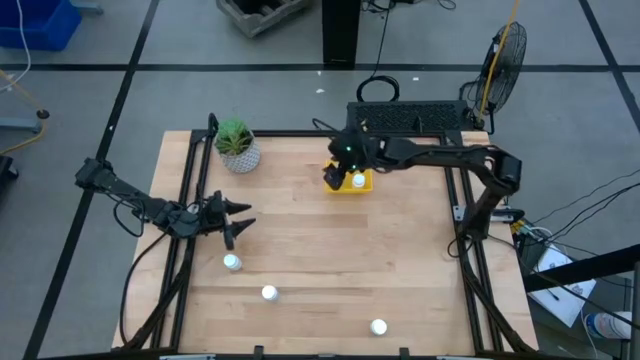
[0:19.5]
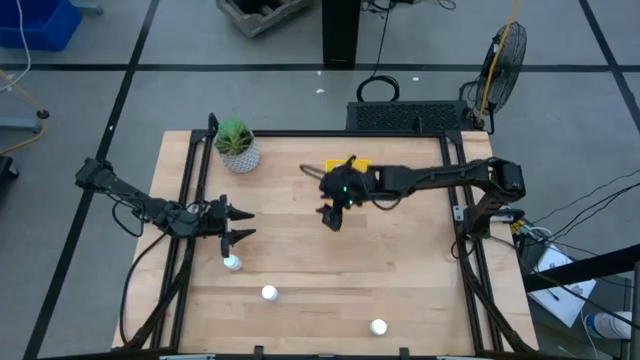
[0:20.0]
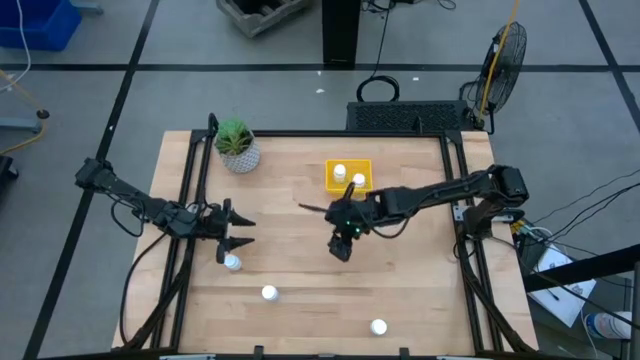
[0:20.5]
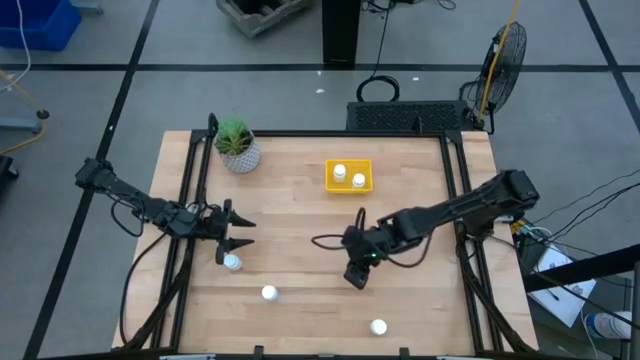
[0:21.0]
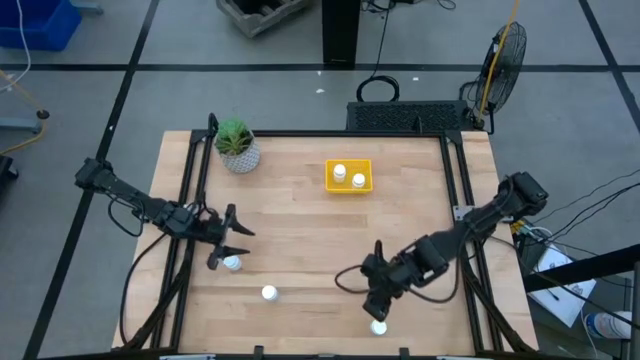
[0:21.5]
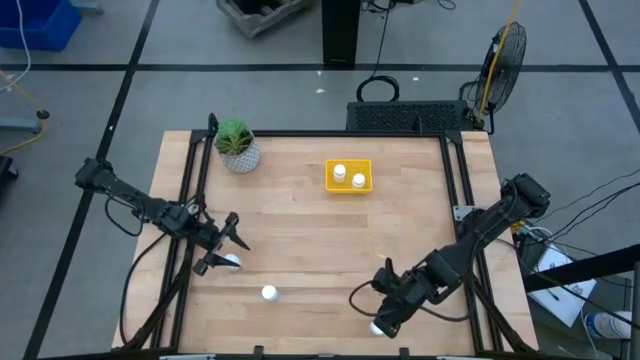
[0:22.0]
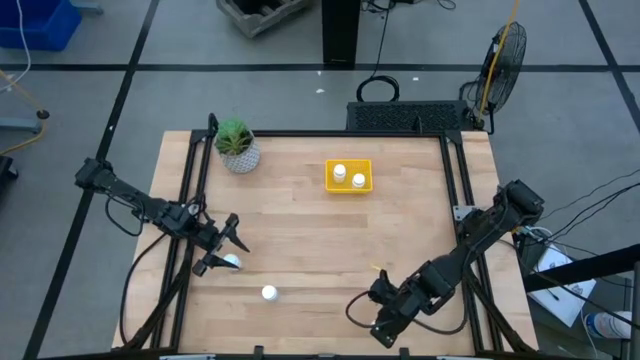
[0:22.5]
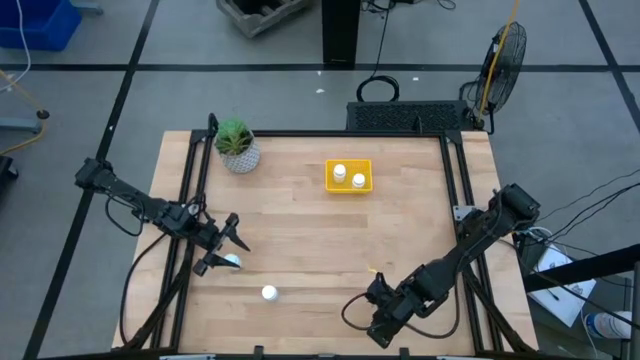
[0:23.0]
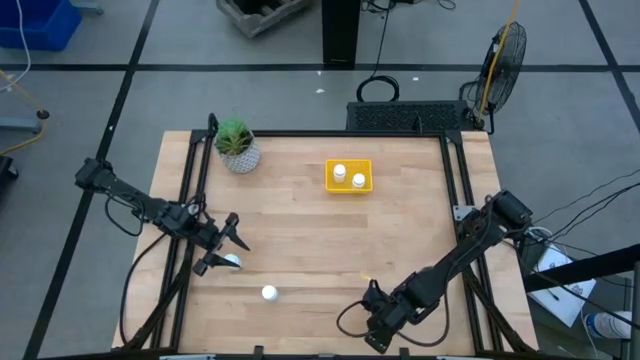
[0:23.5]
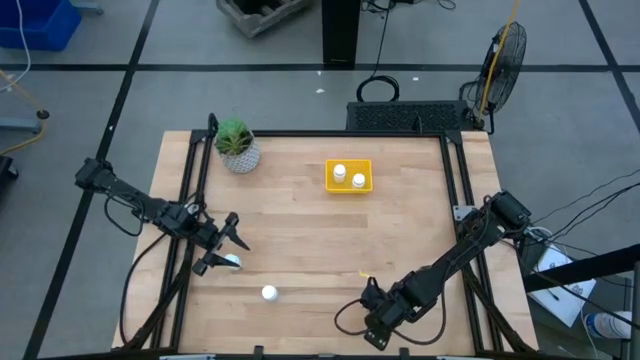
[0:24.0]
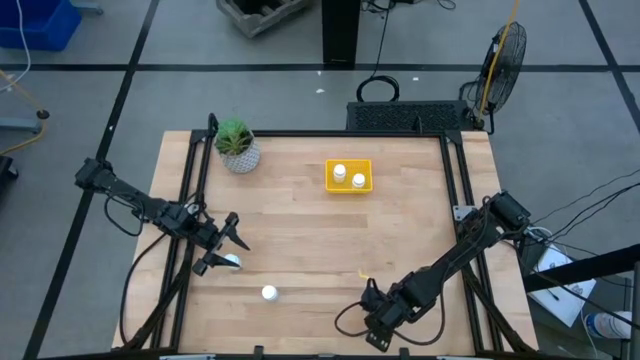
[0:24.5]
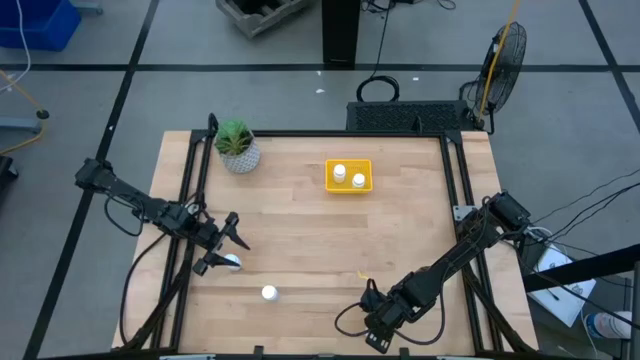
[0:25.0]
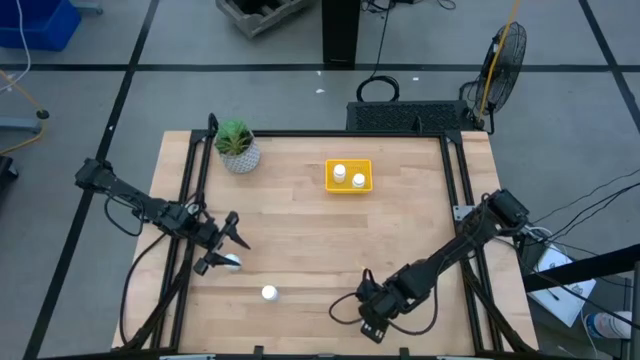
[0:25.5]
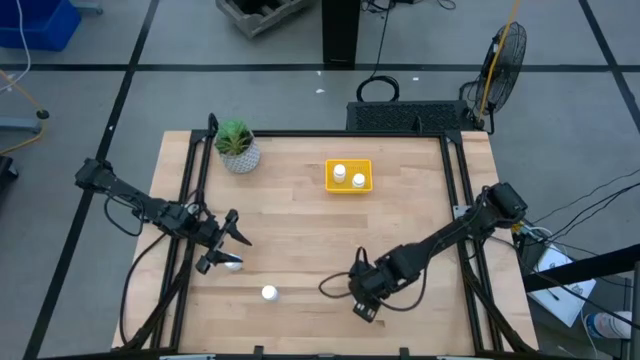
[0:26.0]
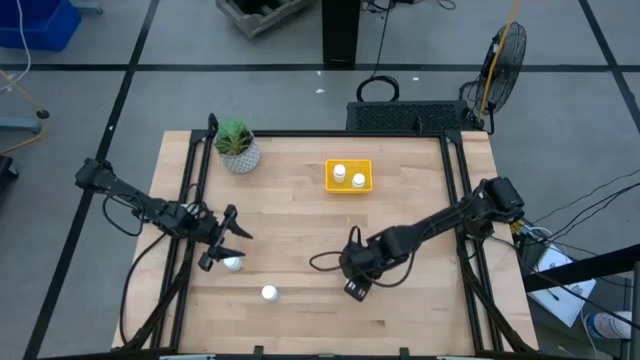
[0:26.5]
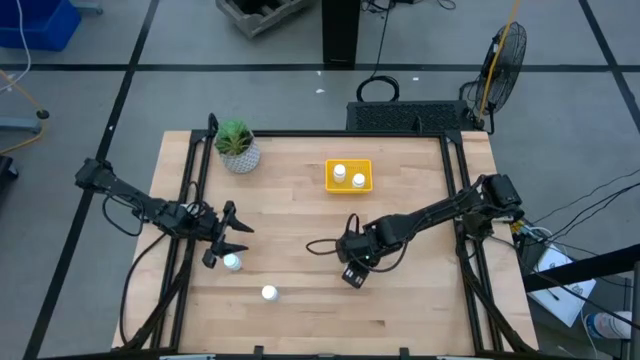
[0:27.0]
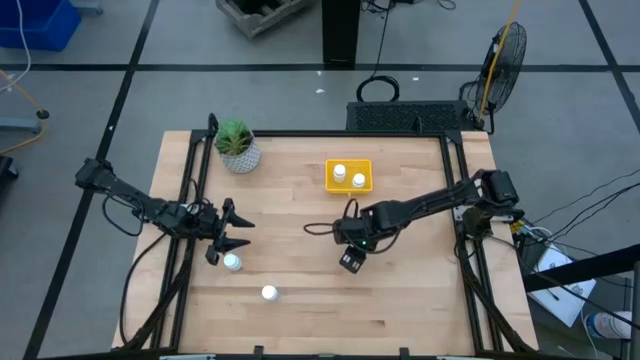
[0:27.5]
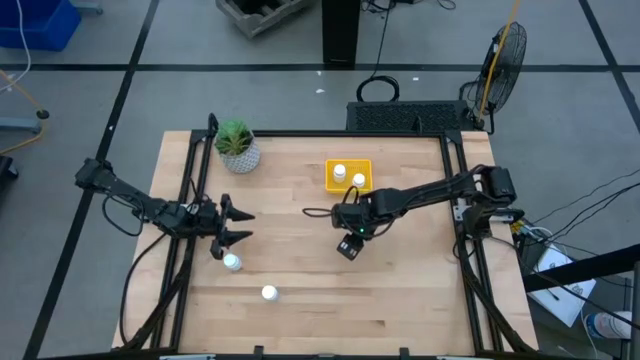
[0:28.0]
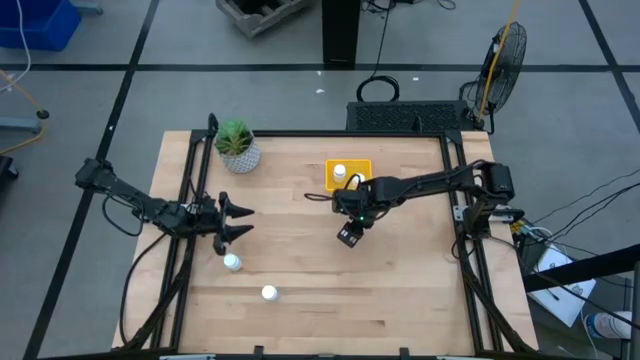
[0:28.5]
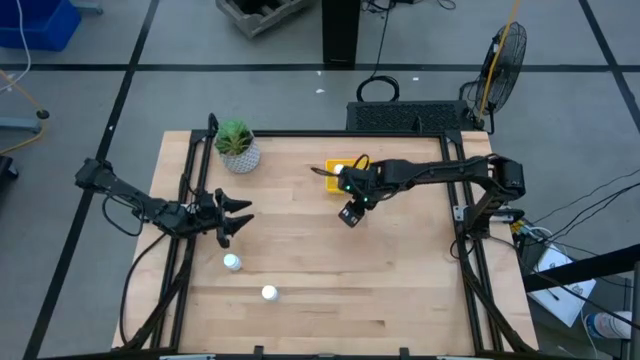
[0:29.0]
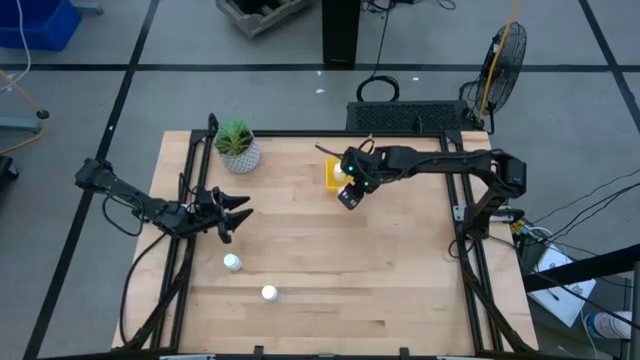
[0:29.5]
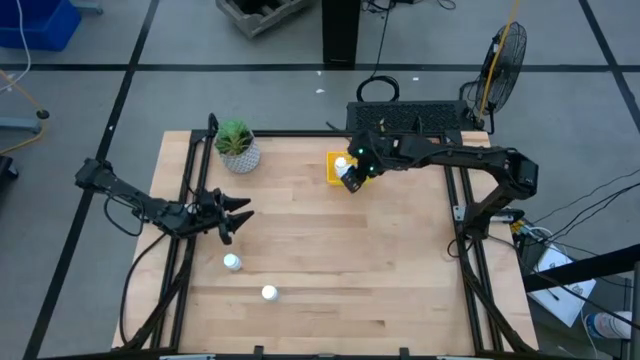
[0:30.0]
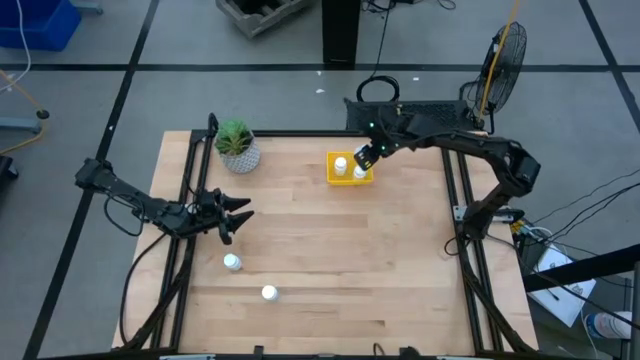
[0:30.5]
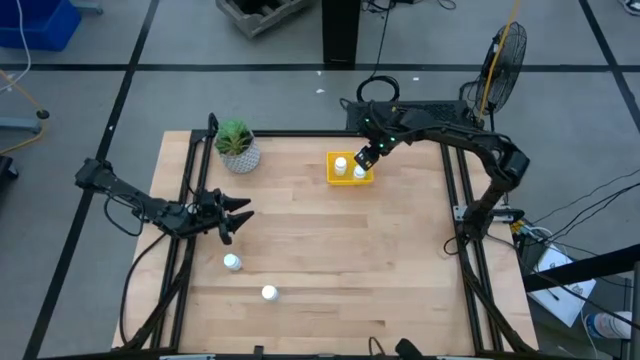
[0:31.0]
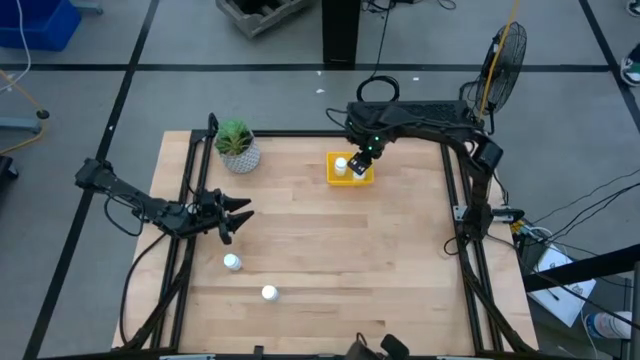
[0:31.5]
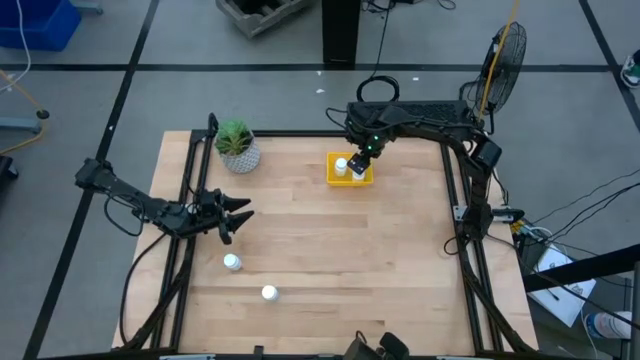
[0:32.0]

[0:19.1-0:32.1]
Task: Pick and place pill bottles into a basket
Put the white pill bottle into the yellow bin

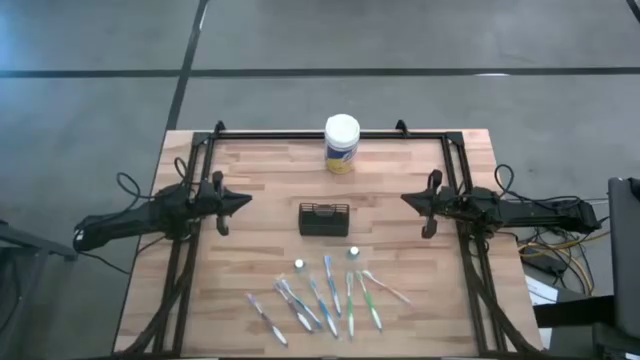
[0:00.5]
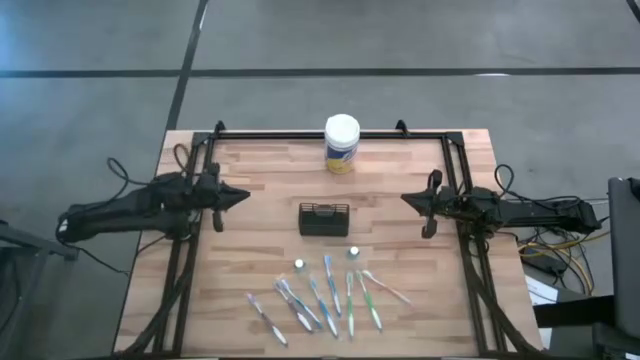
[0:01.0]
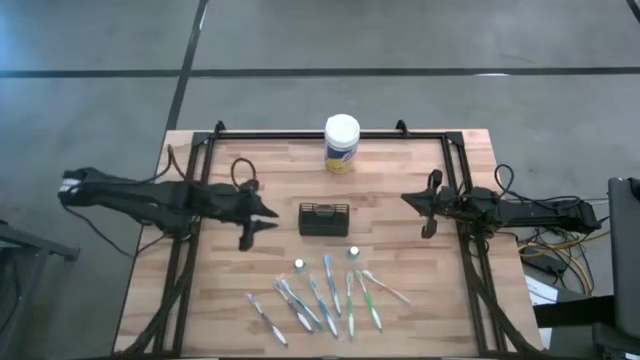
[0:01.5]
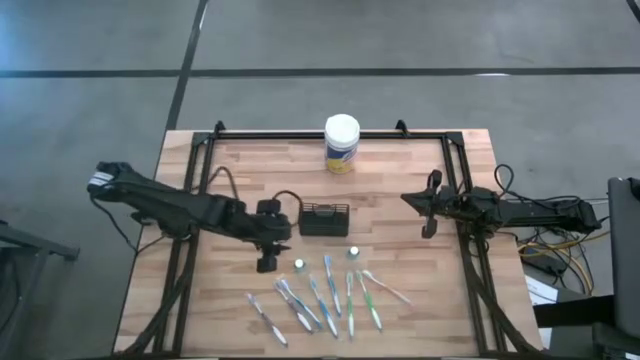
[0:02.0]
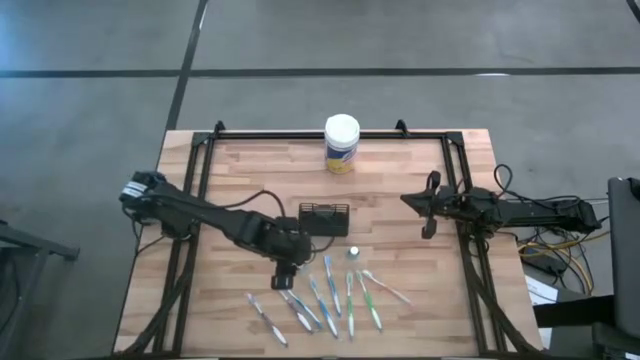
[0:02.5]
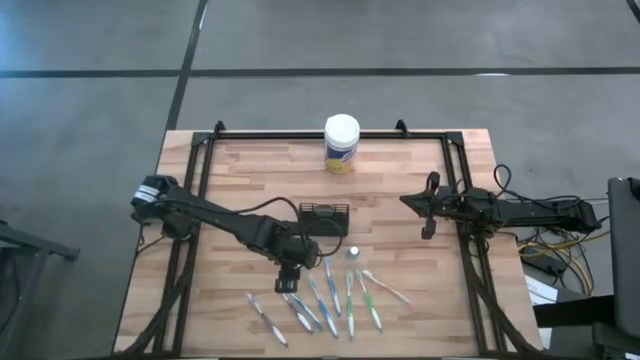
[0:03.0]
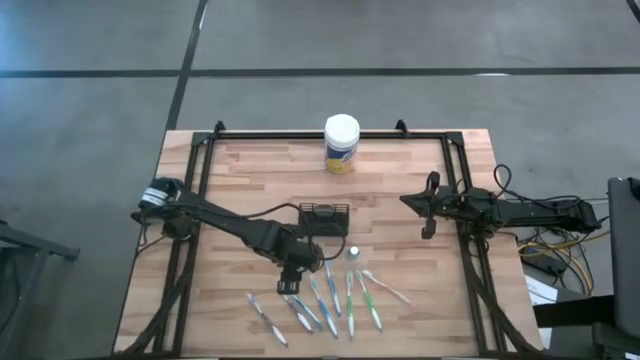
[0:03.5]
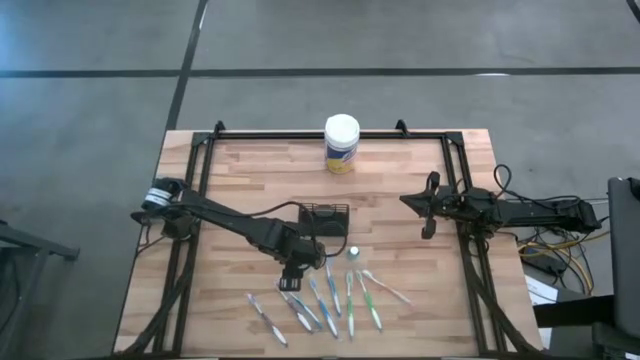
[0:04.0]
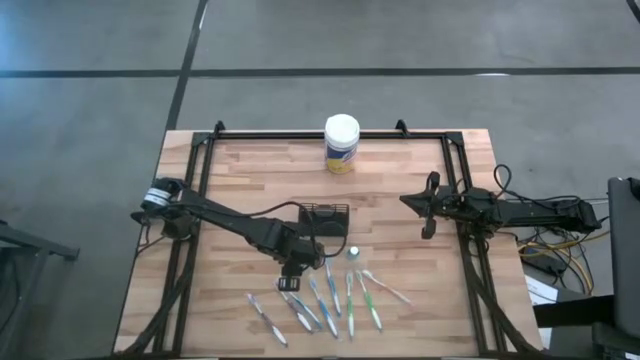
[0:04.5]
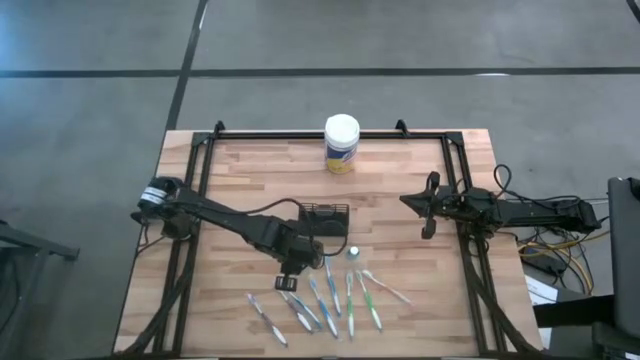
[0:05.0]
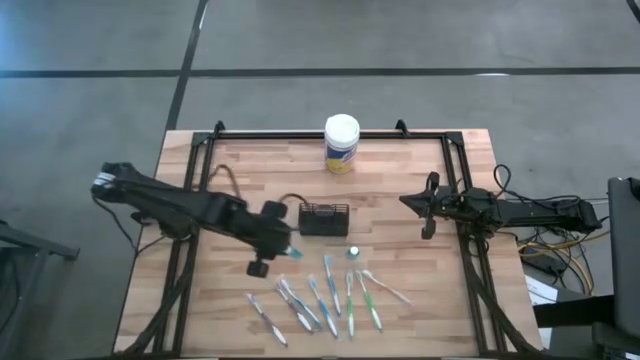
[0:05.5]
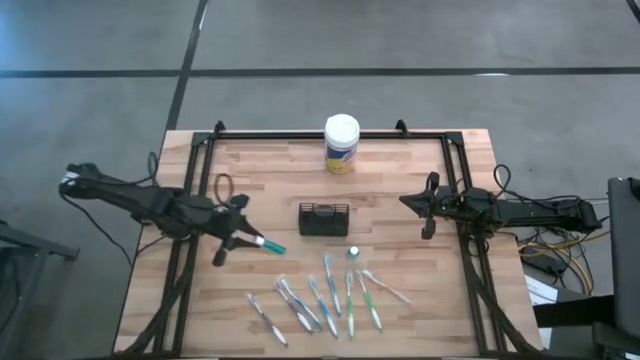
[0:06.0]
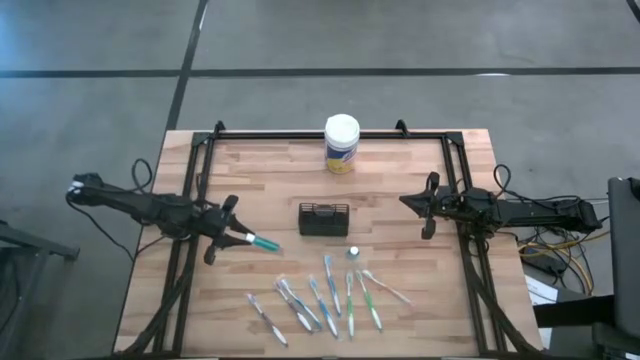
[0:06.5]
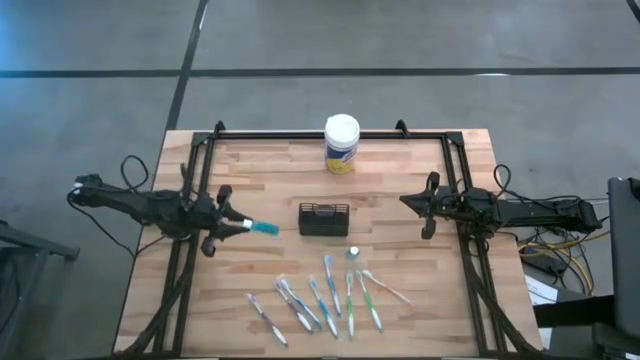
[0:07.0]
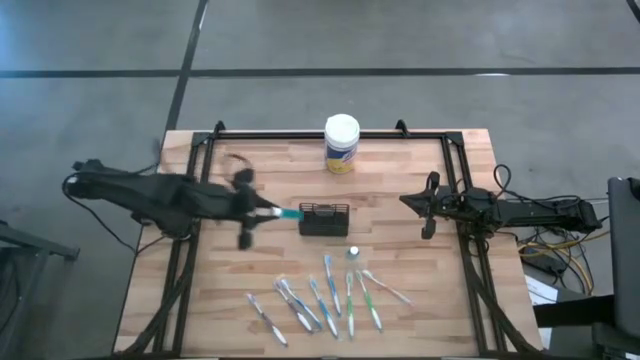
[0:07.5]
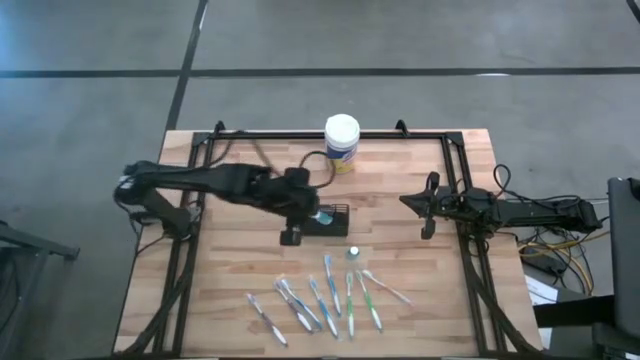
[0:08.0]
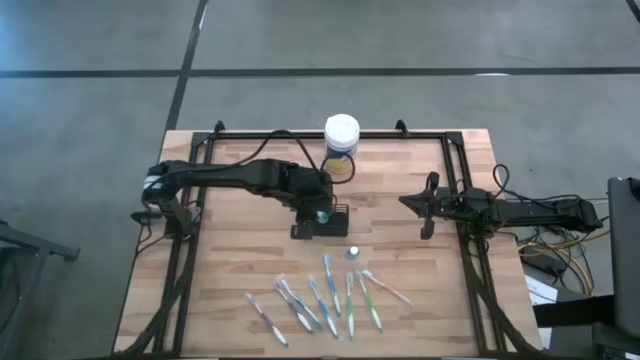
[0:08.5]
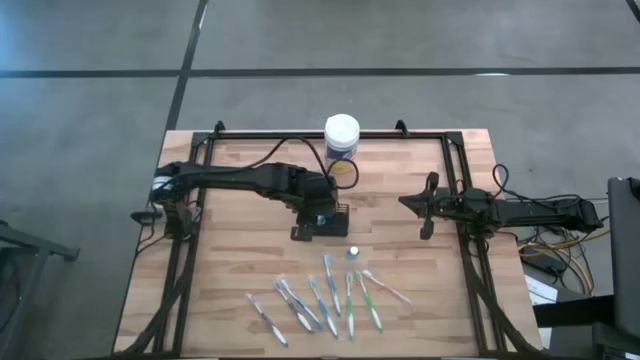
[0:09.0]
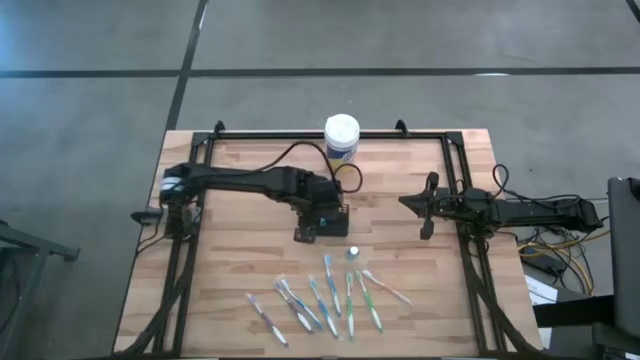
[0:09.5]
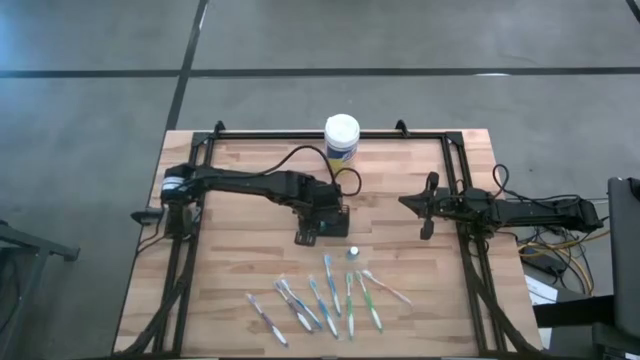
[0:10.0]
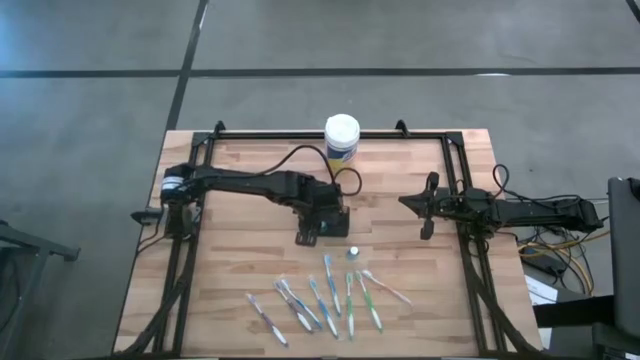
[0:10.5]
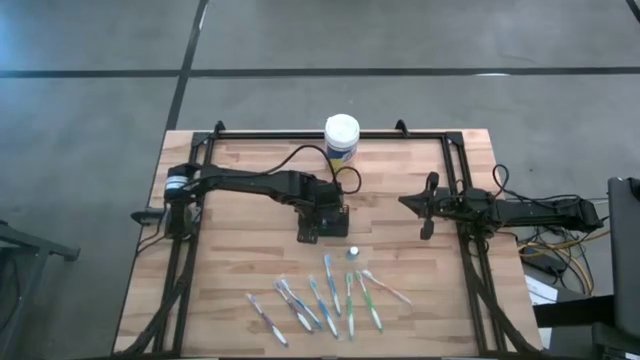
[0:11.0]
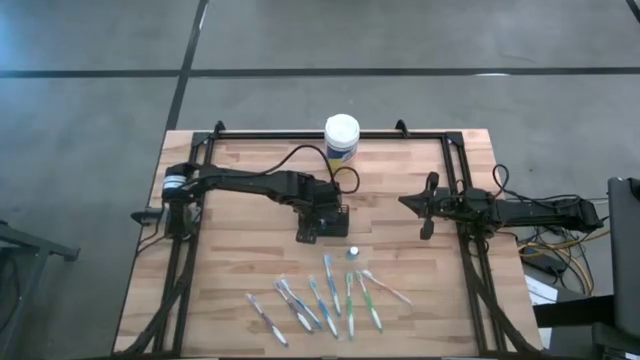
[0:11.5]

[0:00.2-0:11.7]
Task: Pick & Place toothbrushing station
Put the left mouthwash into the wire organizer
